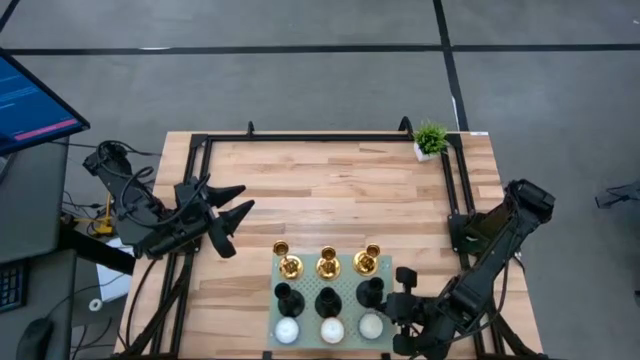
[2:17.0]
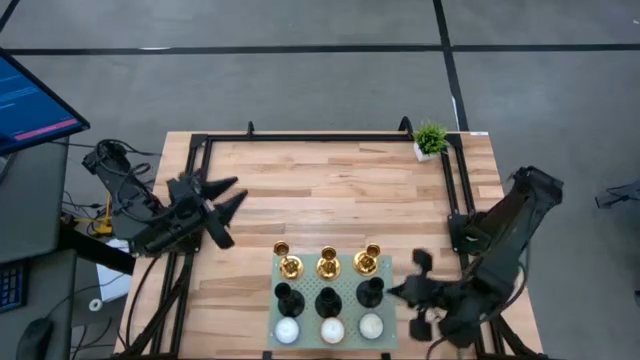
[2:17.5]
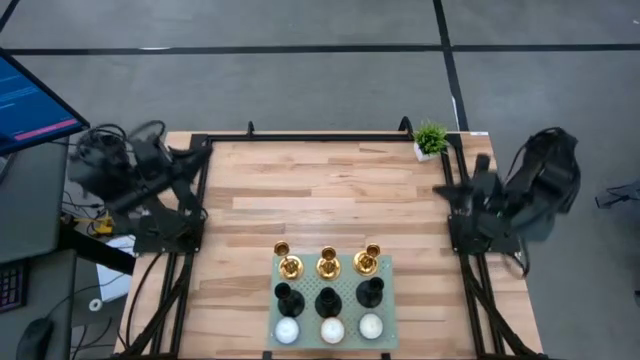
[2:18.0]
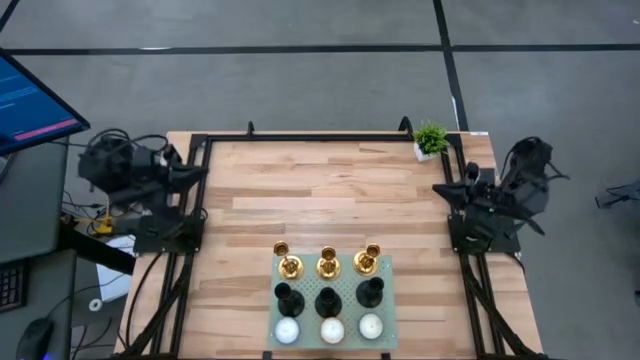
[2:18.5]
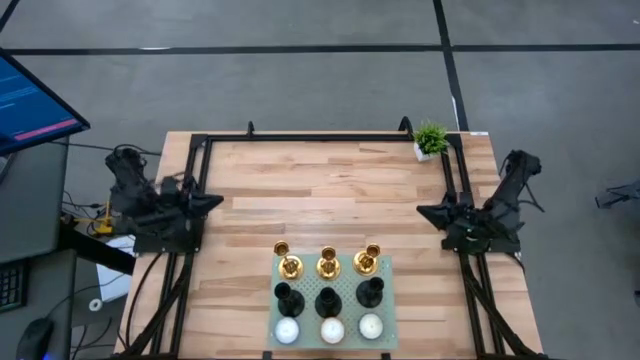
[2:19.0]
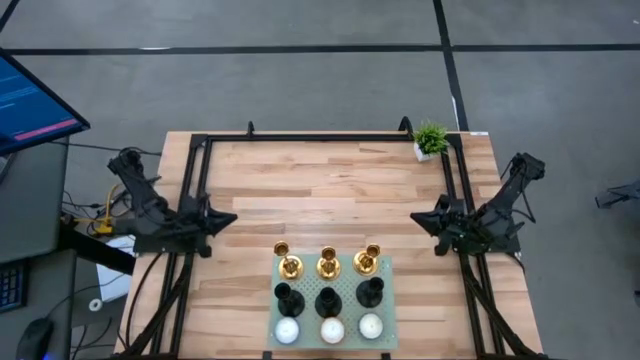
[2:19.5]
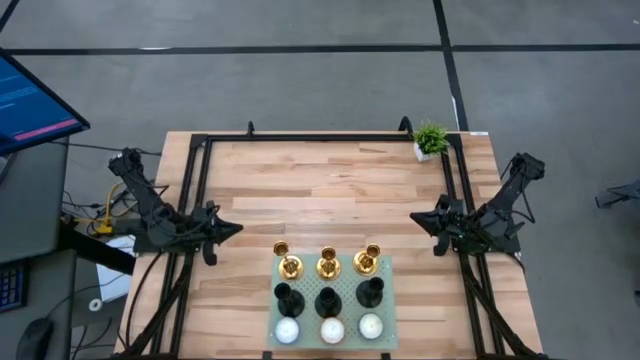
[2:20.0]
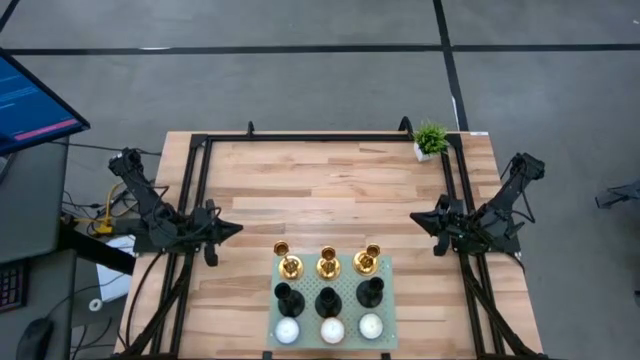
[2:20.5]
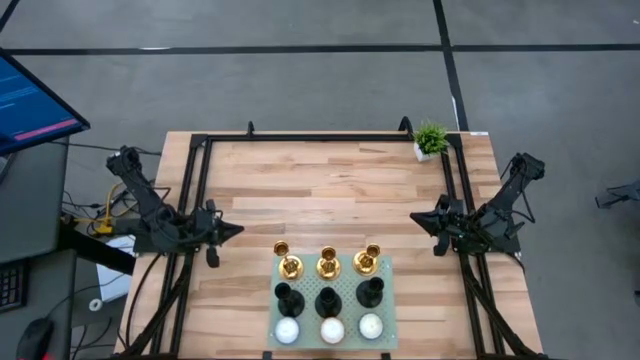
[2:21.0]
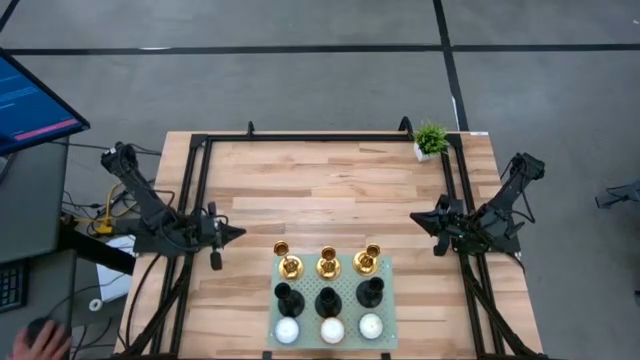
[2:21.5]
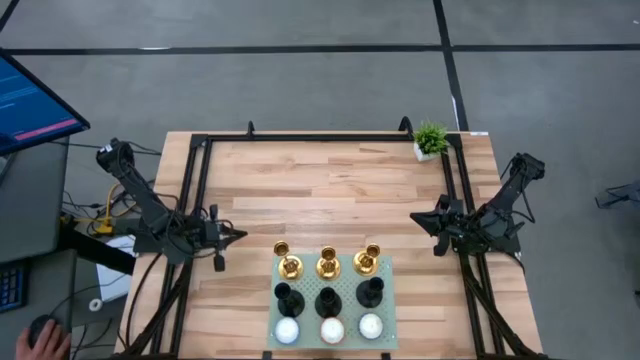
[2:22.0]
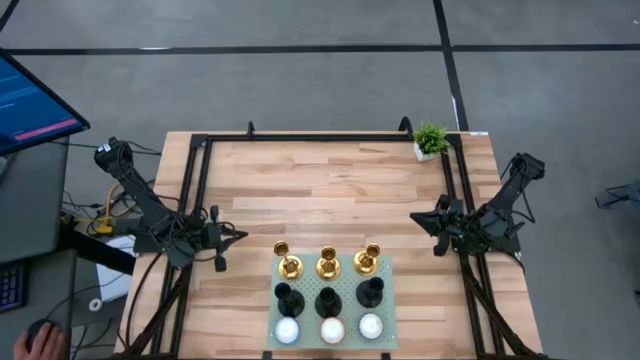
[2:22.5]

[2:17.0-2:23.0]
Task: Pick & Place candle stick holders
Return to Home Position

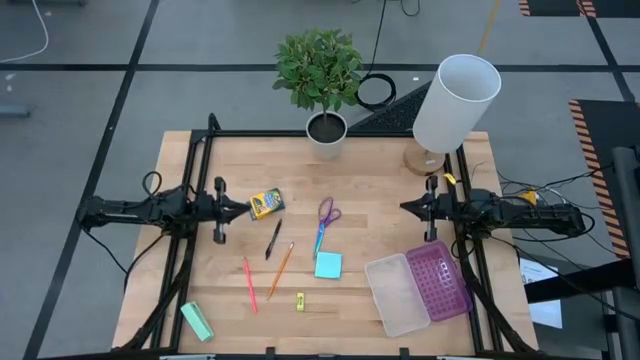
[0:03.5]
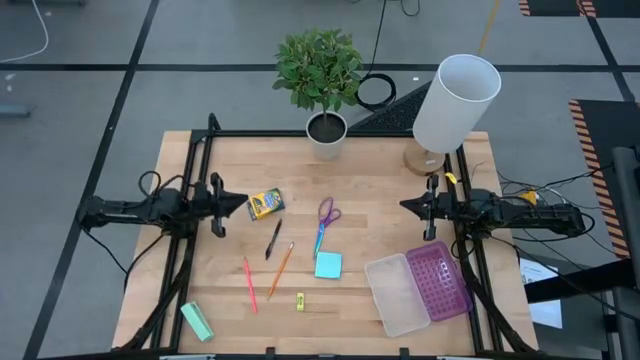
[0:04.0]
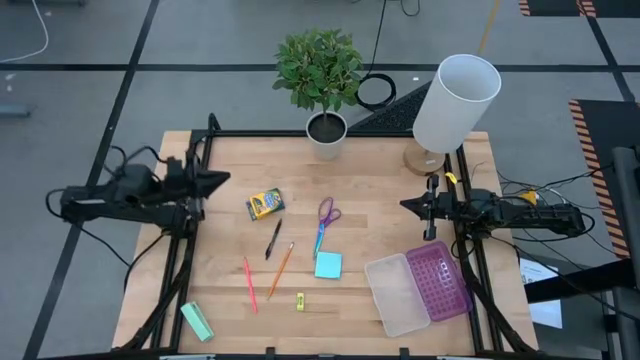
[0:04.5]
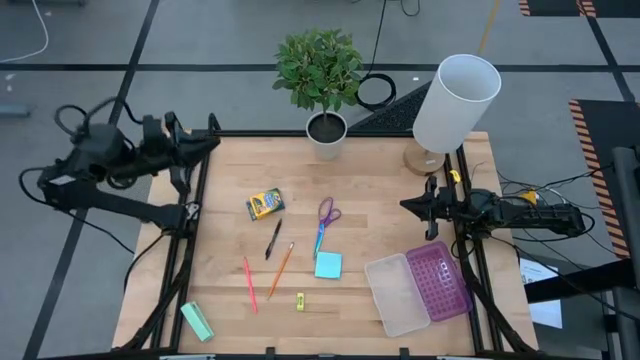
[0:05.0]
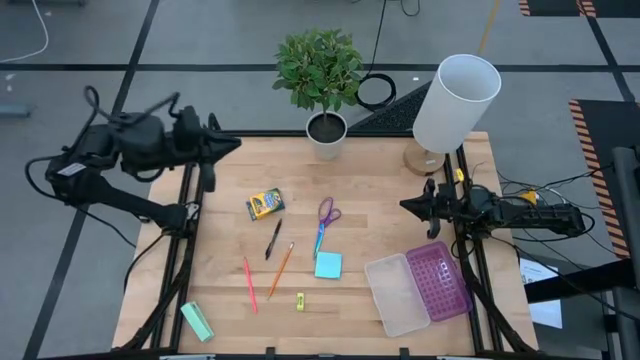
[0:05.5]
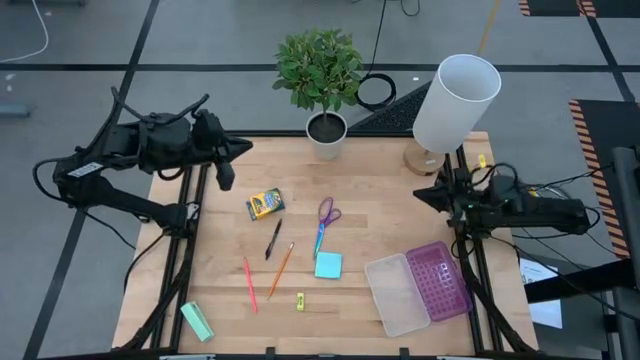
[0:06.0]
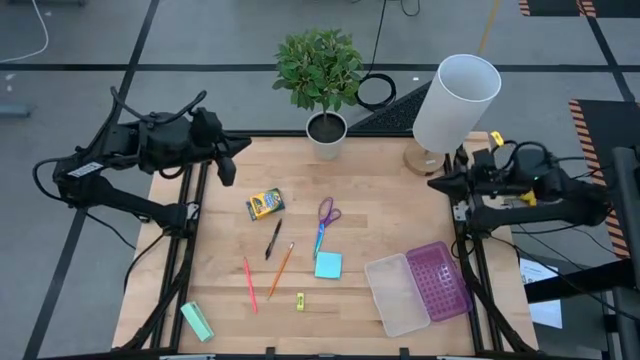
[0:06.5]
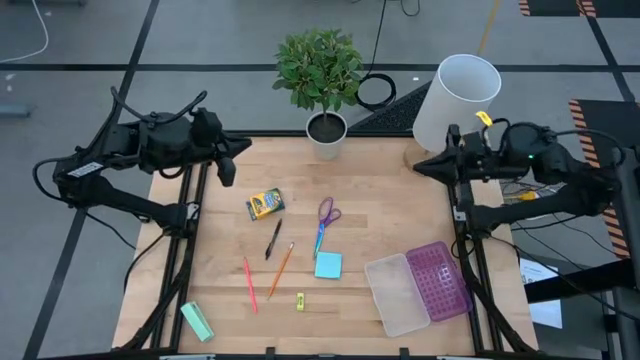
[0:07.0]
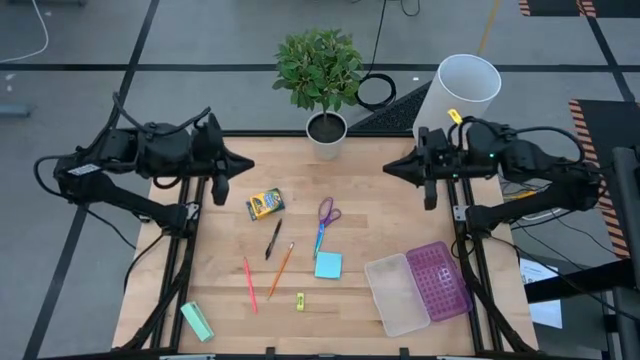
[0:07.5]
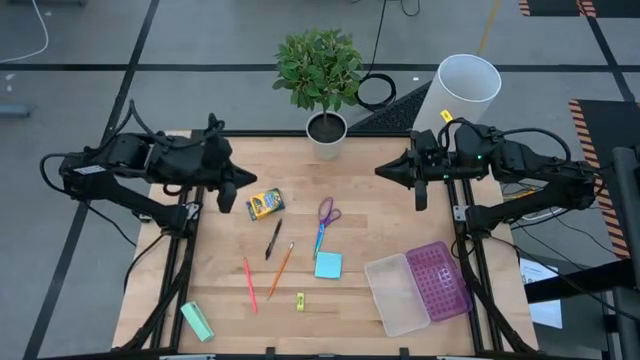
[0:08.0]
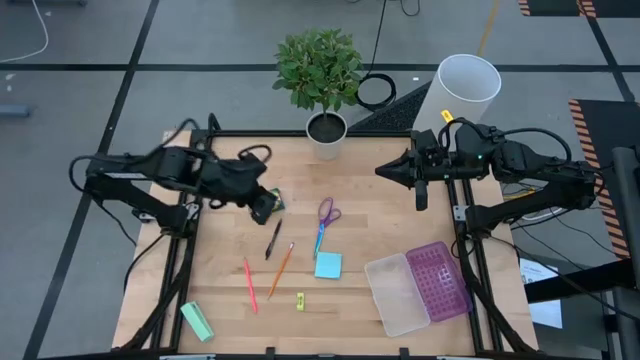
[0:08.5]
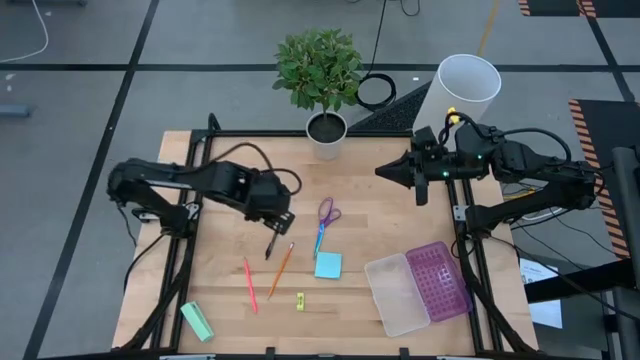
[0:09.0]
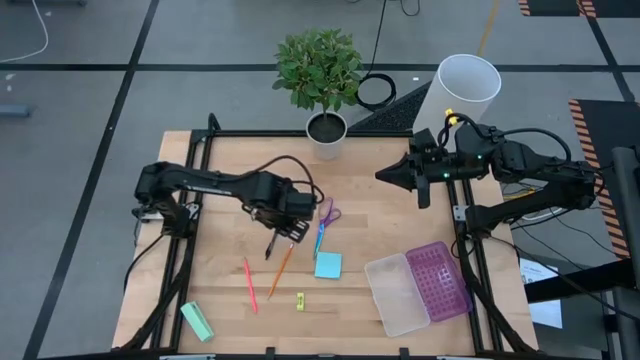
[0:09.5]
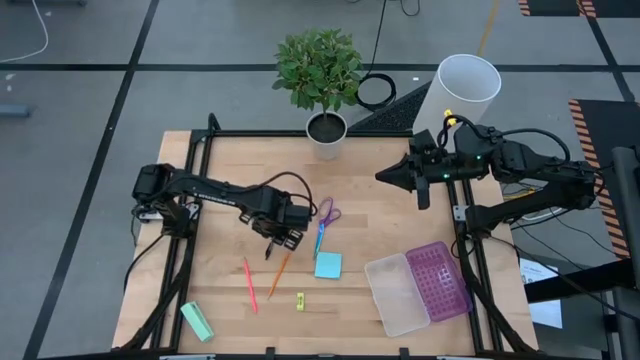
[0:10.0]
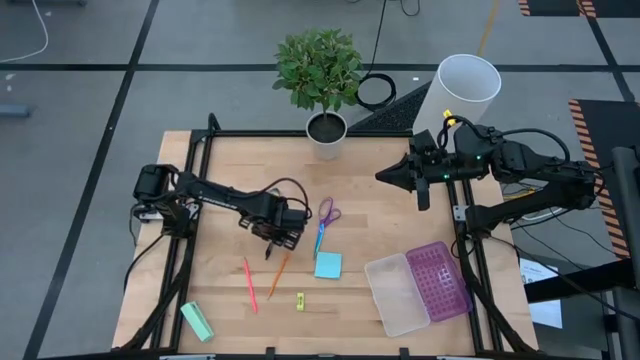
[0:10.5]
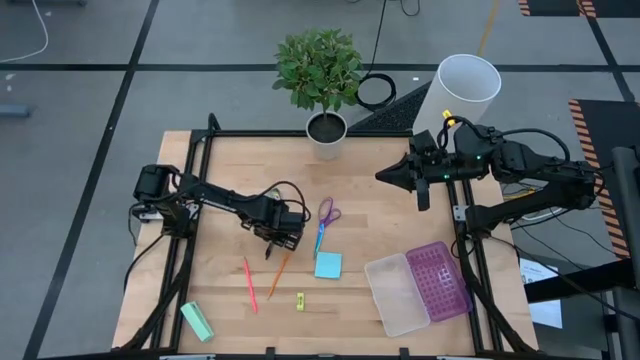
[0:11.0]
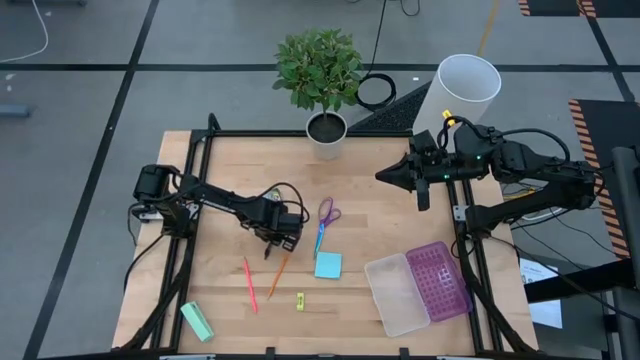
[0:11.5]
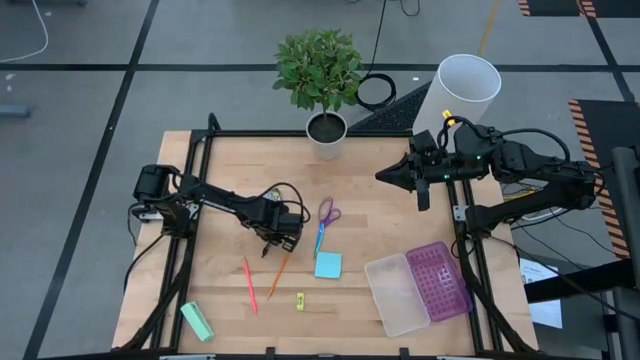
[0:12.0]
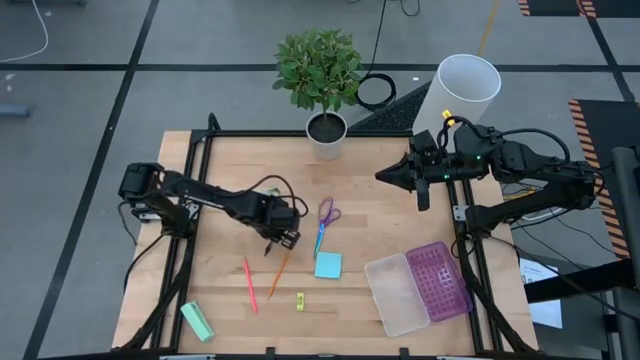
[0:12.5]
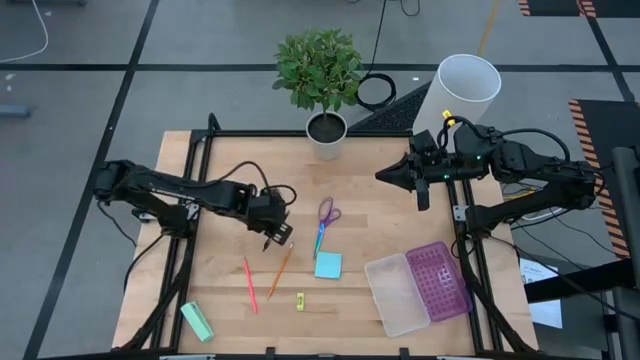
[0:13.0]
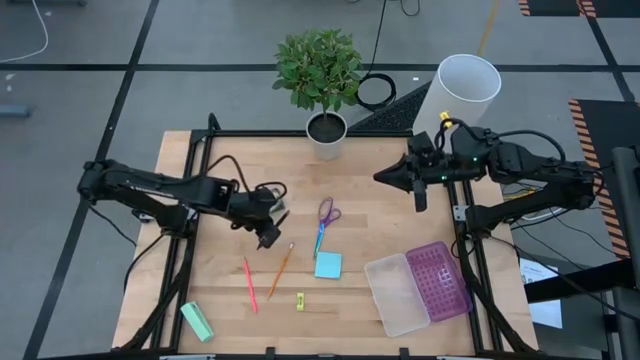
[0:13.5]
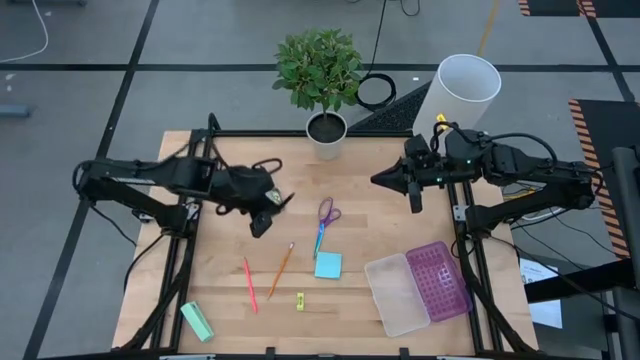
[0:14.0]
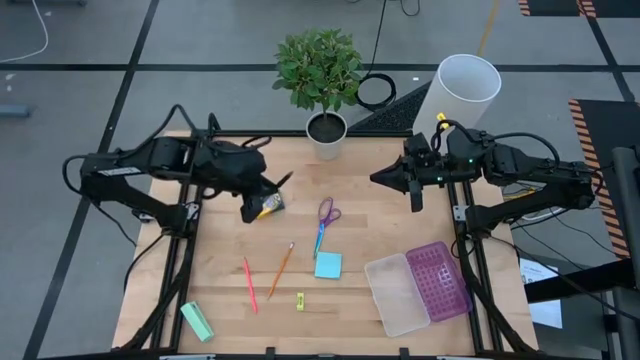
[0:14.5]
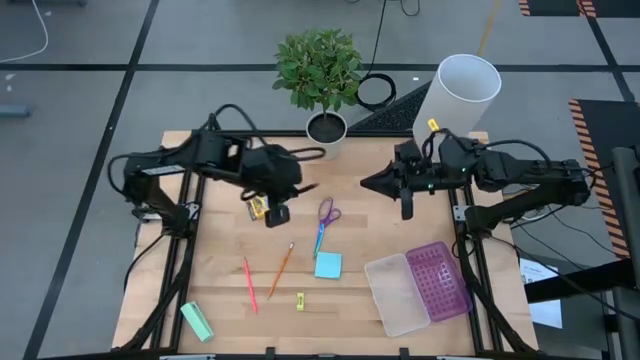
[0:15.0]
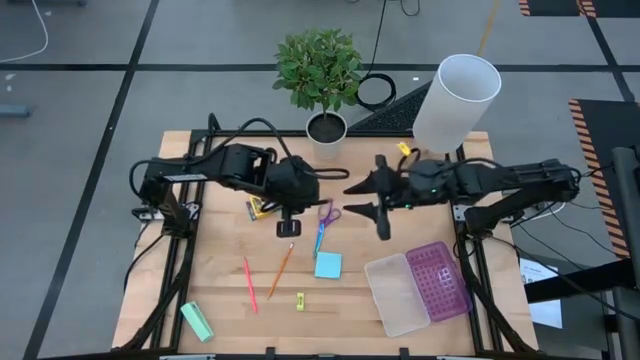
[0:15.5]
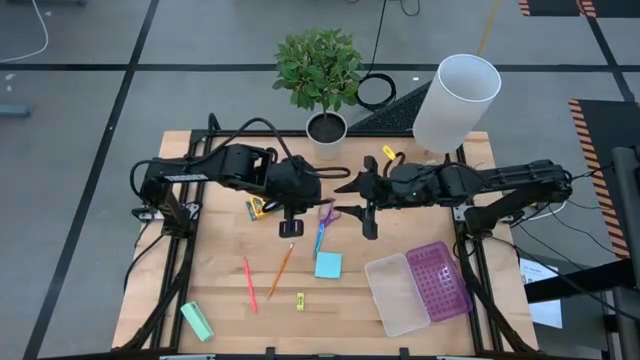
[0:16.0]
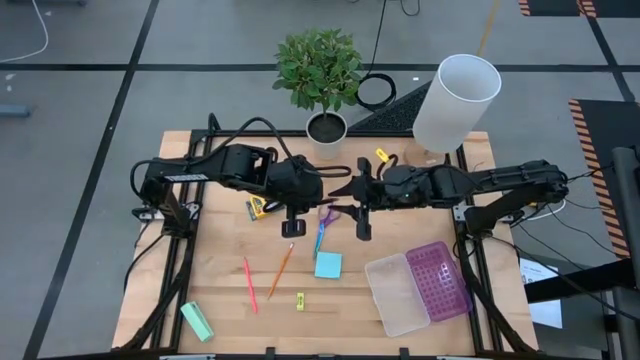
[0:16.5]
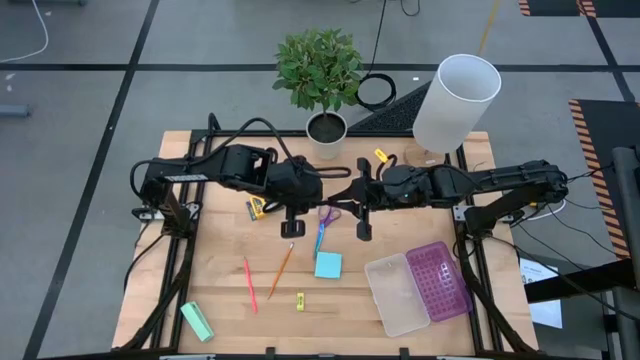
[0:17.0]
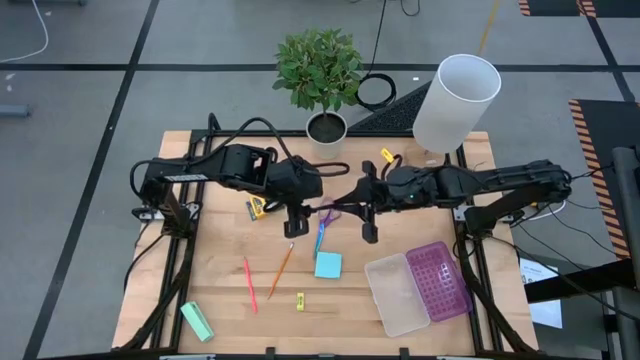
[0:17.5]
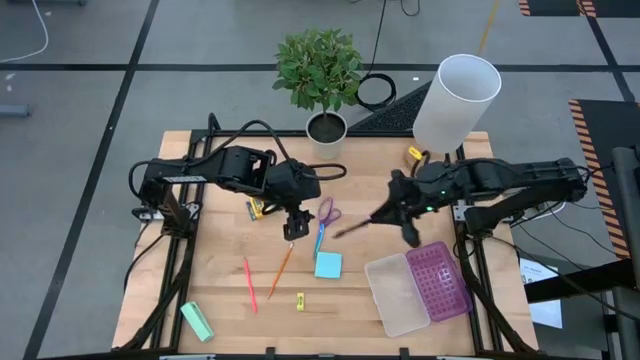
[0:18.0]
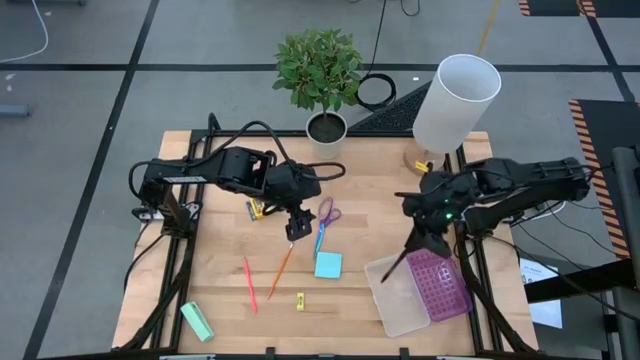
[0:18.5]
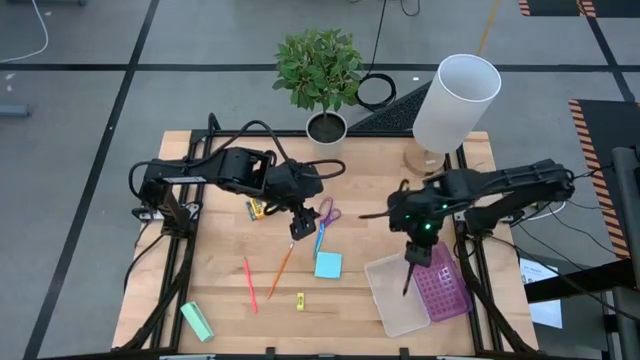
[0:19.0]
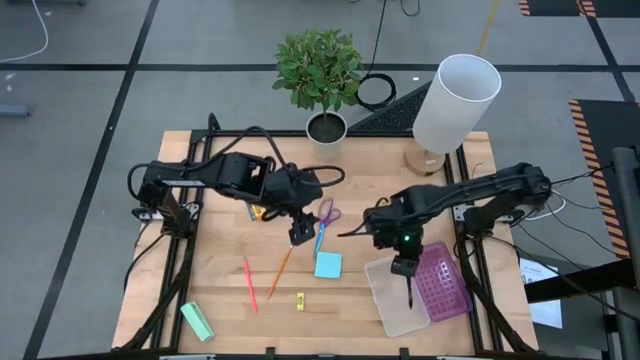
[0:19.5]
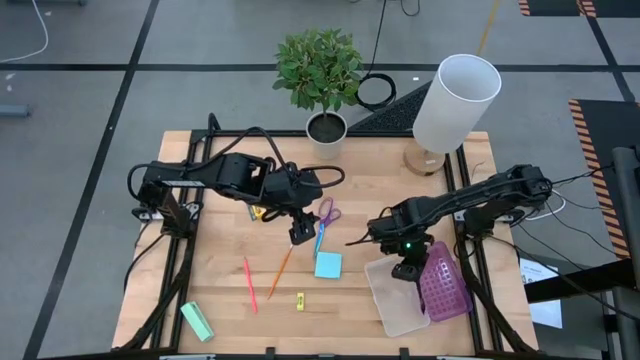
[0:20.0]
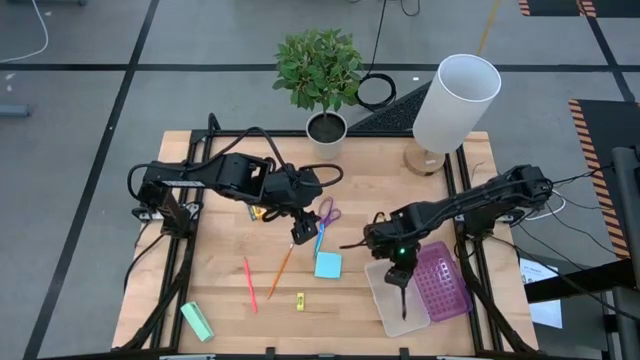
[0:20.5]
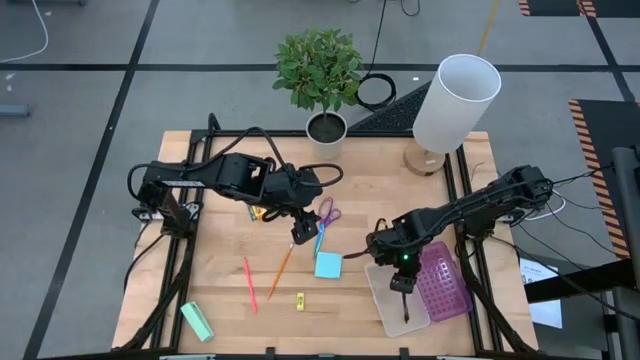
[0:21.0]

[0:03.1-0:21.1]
Task: Pack school essentials
Put the black pen into the purple supply box
